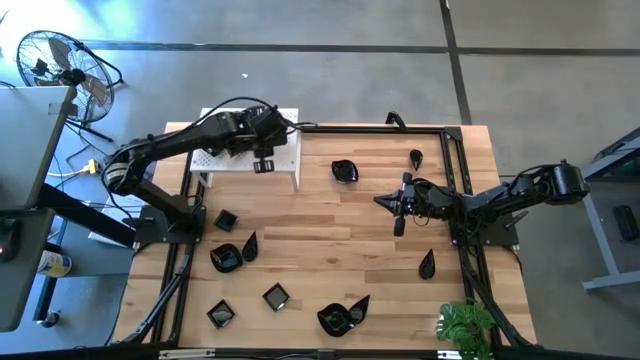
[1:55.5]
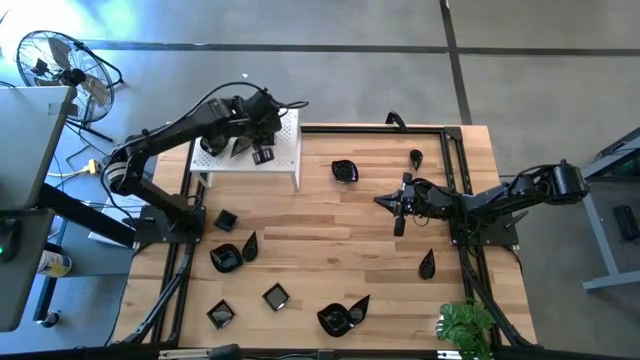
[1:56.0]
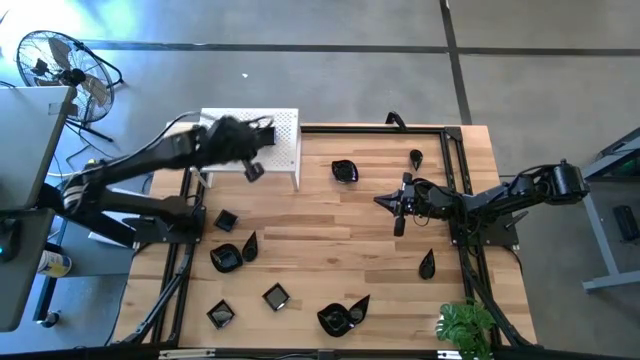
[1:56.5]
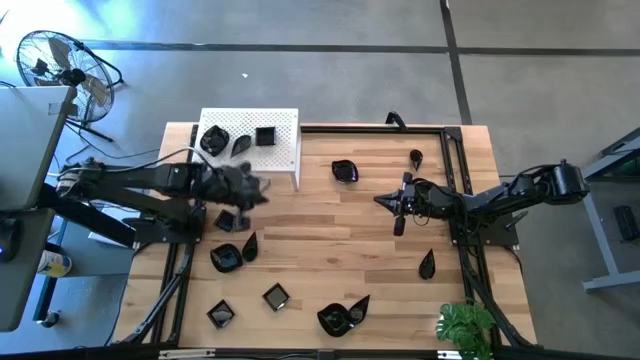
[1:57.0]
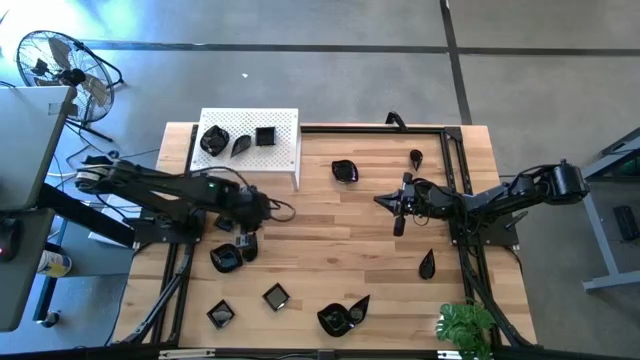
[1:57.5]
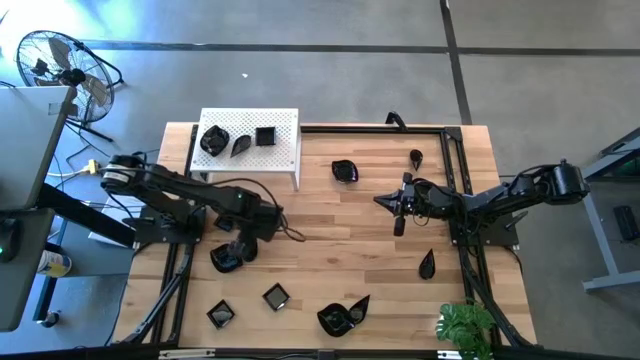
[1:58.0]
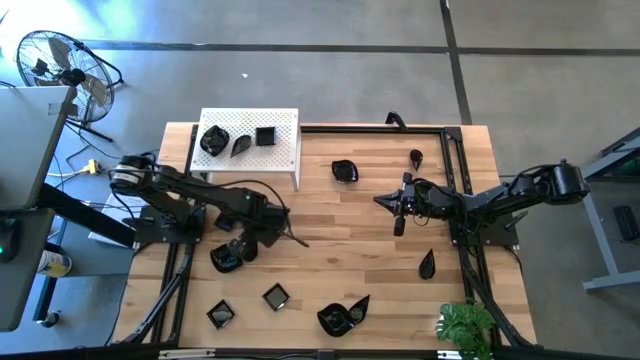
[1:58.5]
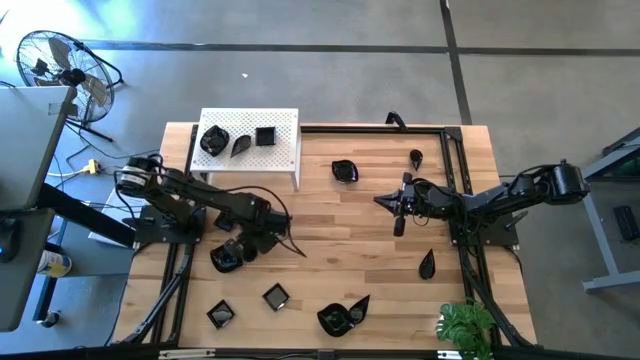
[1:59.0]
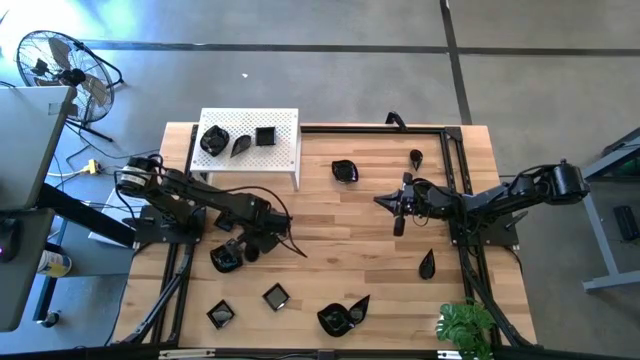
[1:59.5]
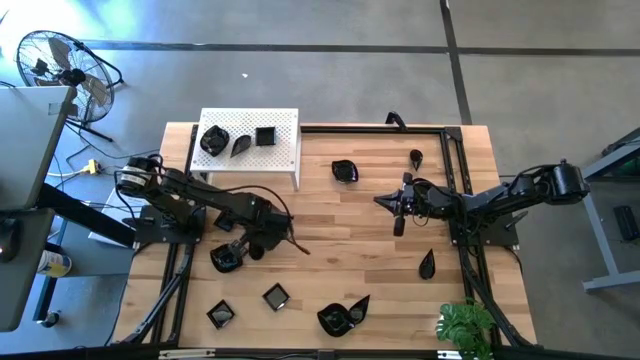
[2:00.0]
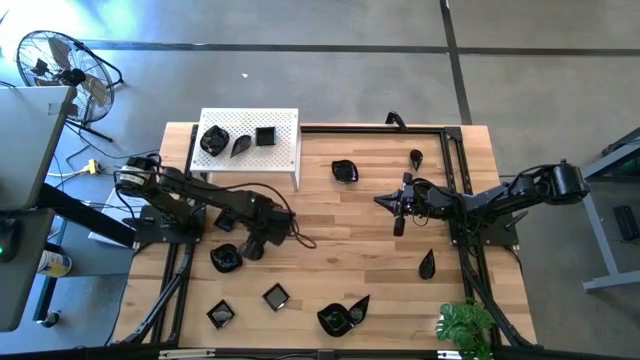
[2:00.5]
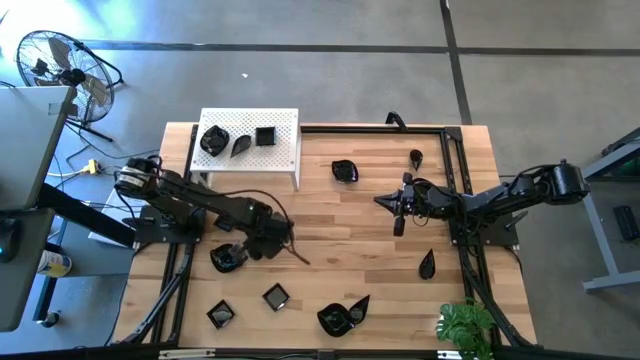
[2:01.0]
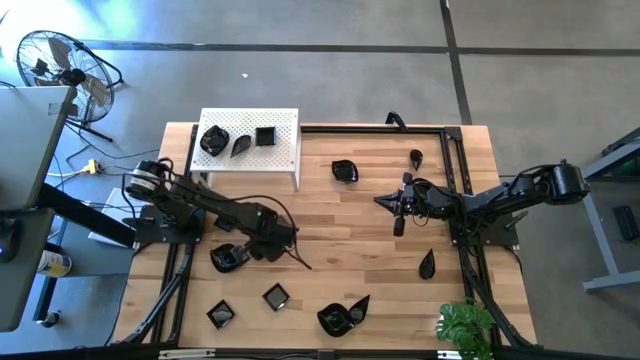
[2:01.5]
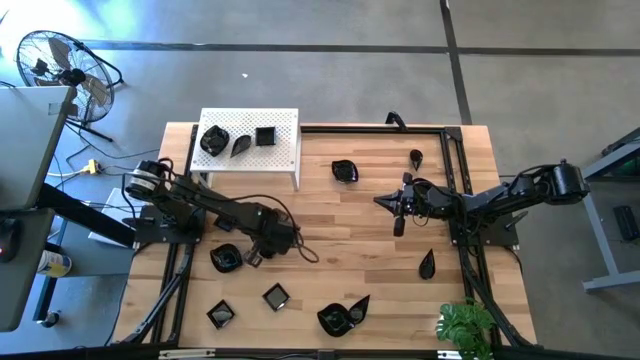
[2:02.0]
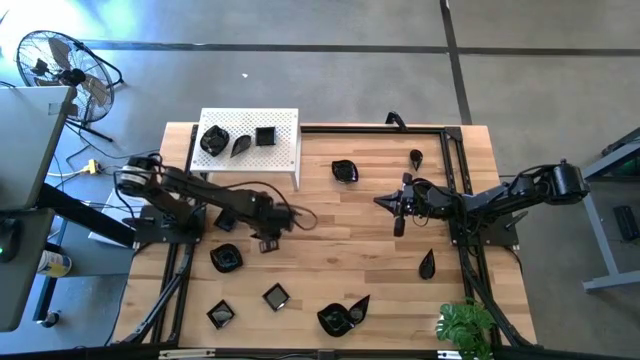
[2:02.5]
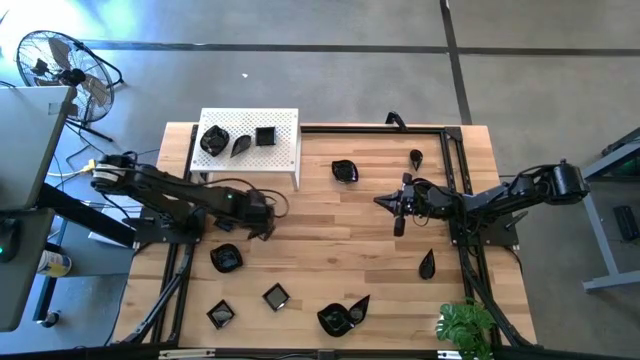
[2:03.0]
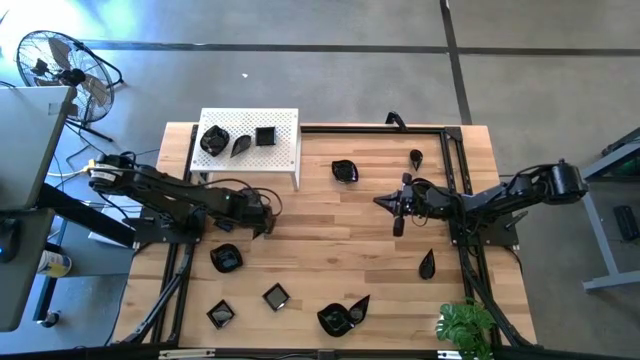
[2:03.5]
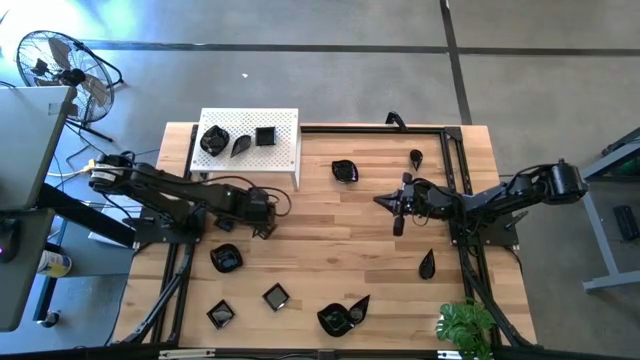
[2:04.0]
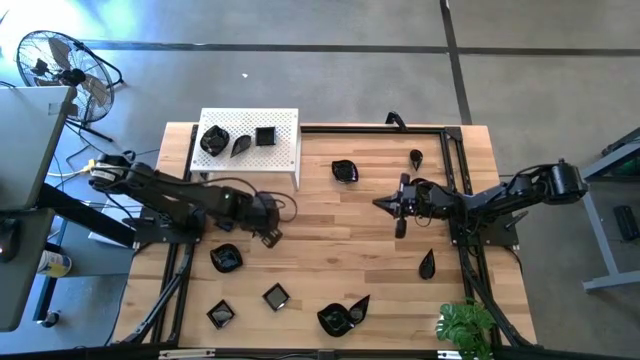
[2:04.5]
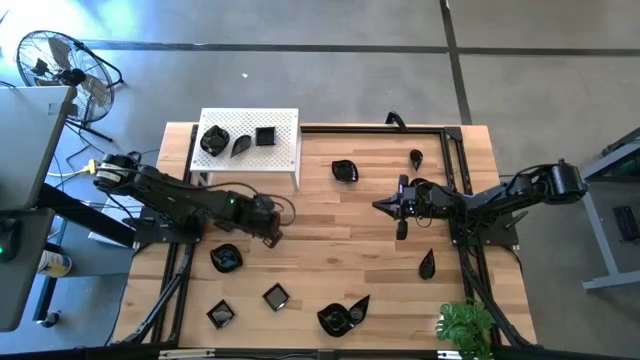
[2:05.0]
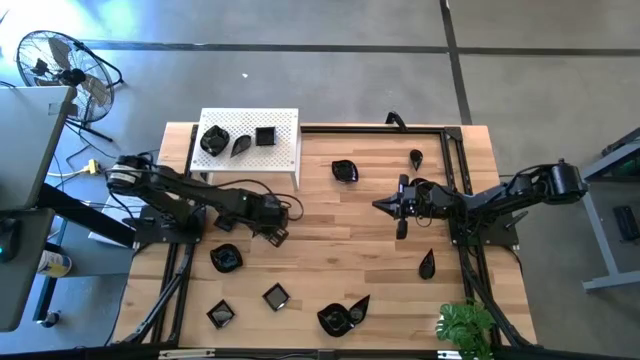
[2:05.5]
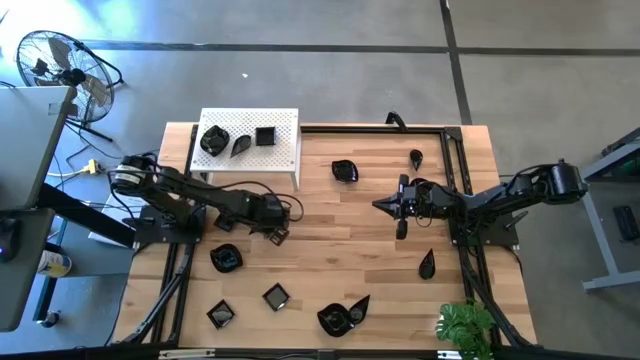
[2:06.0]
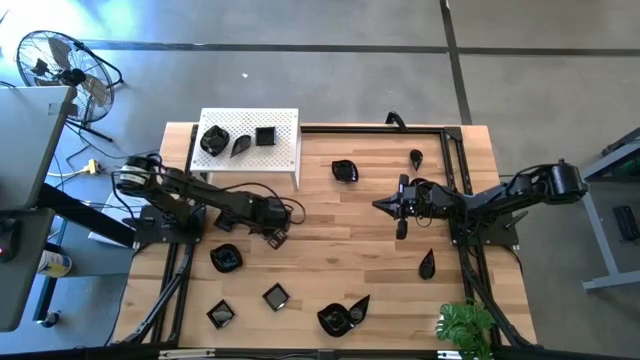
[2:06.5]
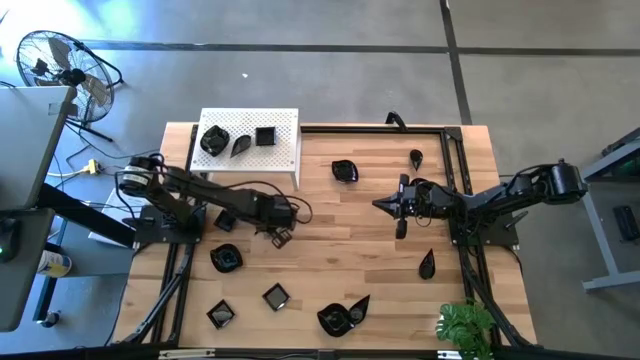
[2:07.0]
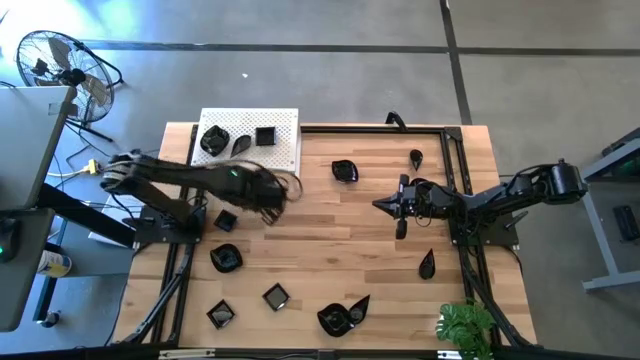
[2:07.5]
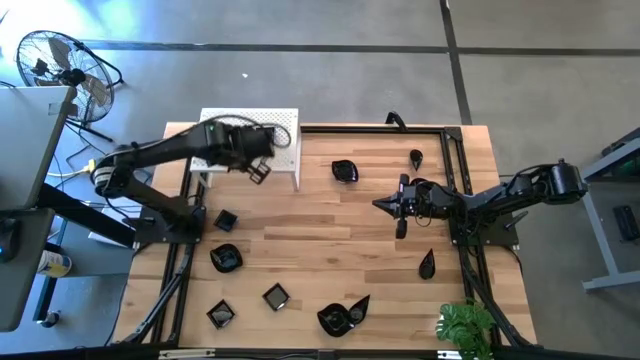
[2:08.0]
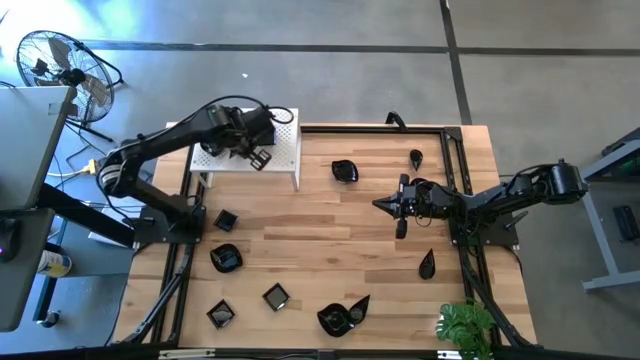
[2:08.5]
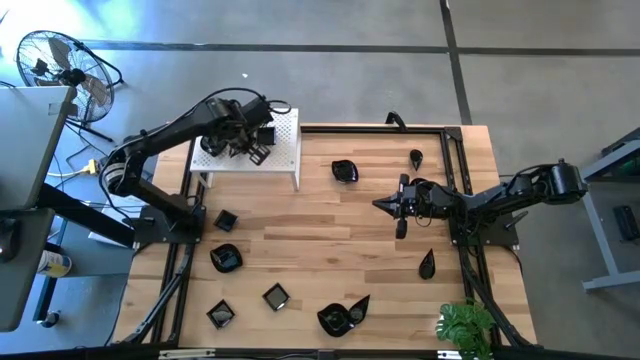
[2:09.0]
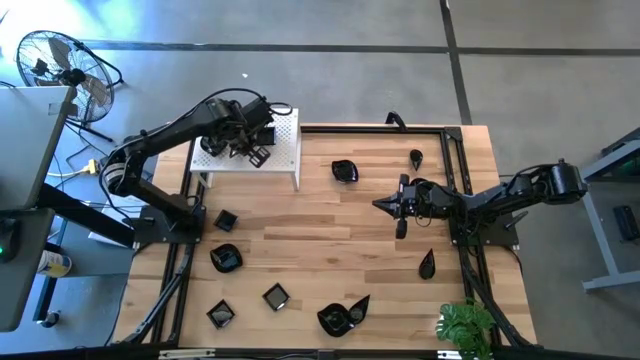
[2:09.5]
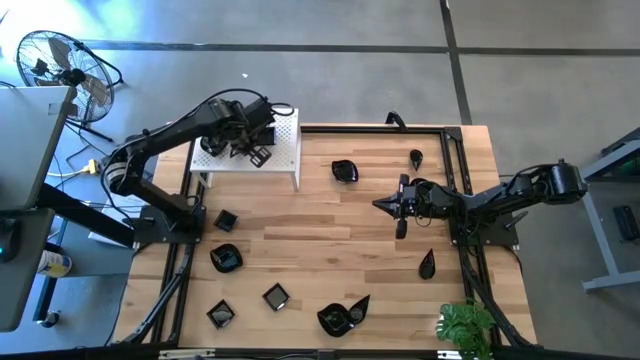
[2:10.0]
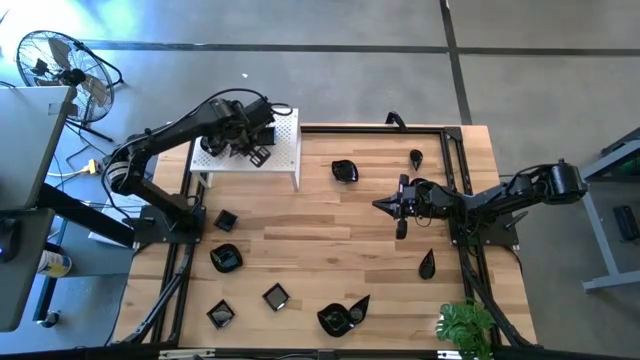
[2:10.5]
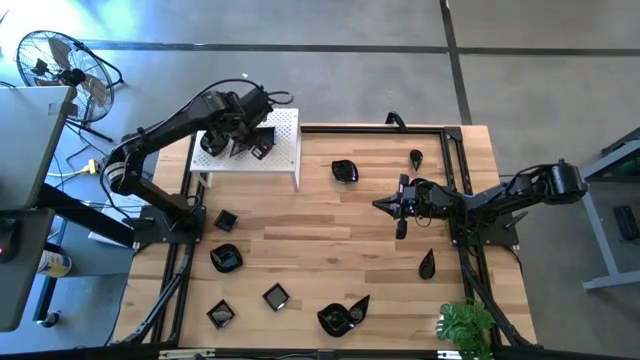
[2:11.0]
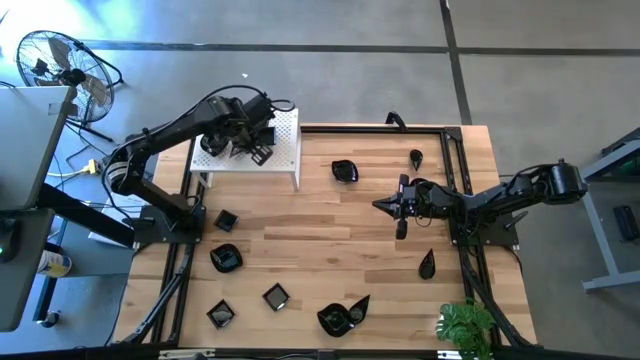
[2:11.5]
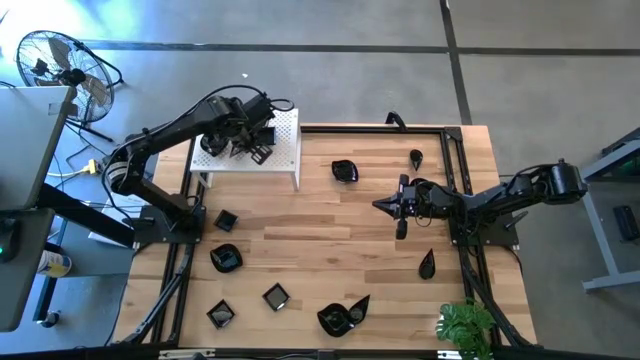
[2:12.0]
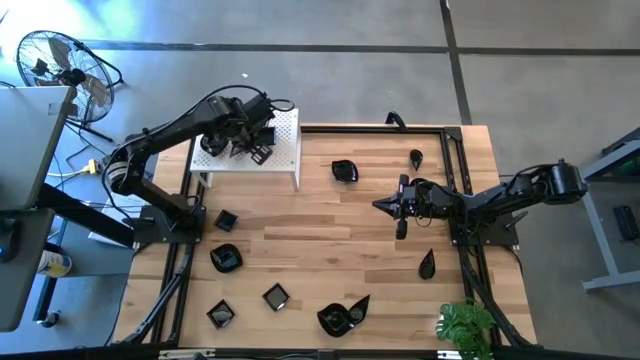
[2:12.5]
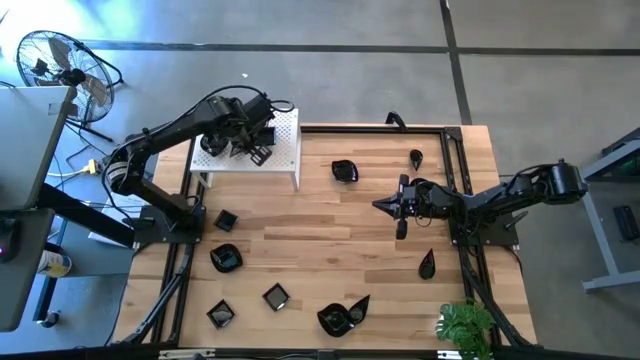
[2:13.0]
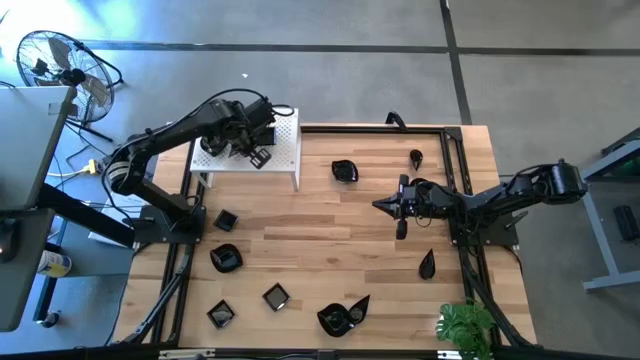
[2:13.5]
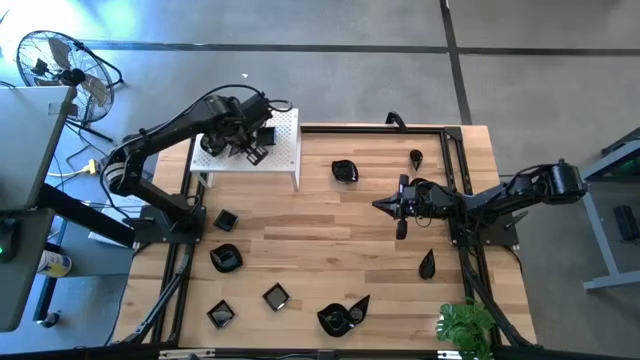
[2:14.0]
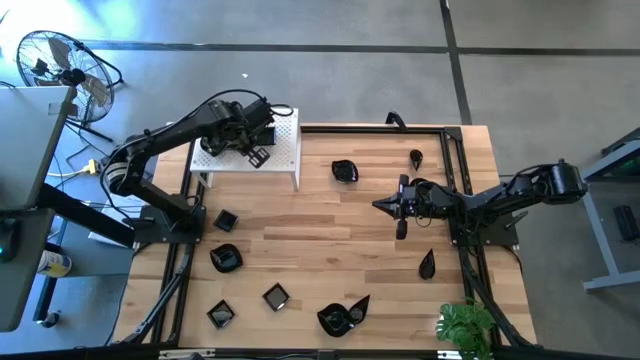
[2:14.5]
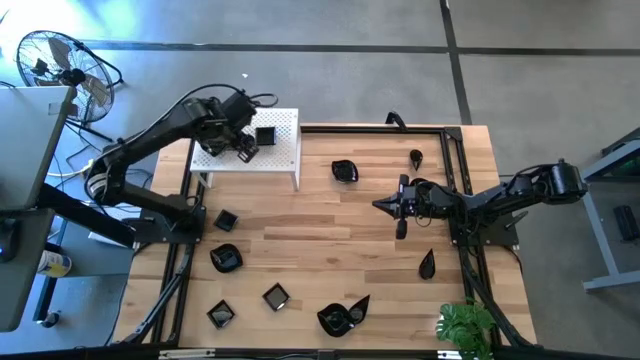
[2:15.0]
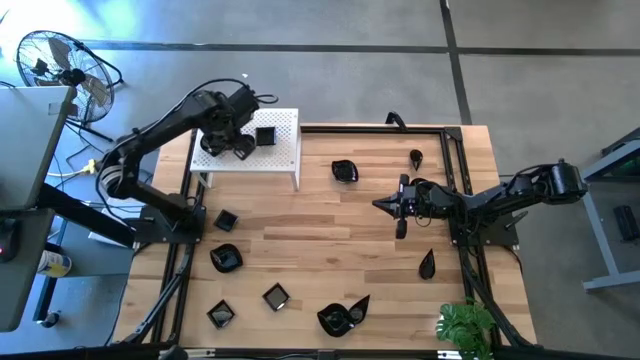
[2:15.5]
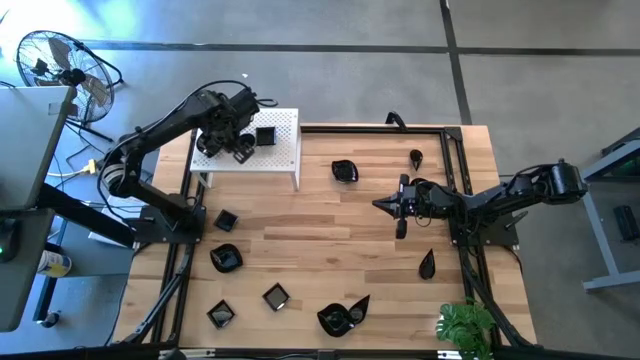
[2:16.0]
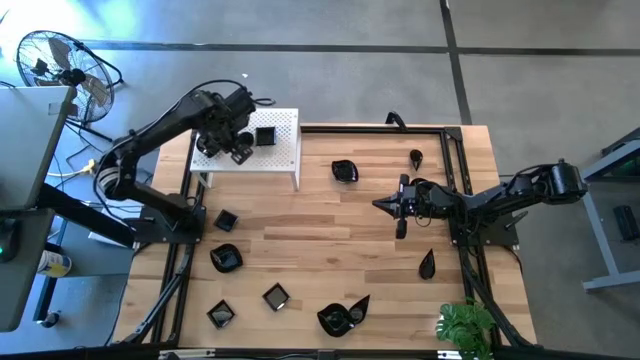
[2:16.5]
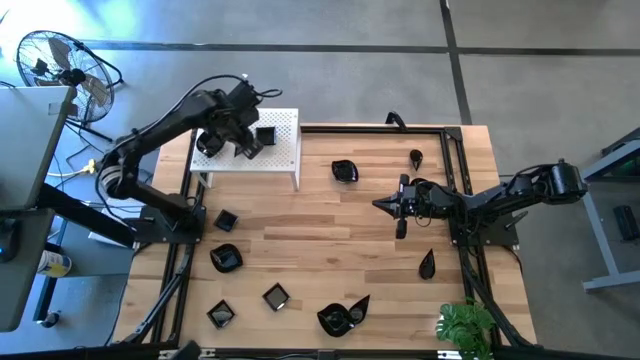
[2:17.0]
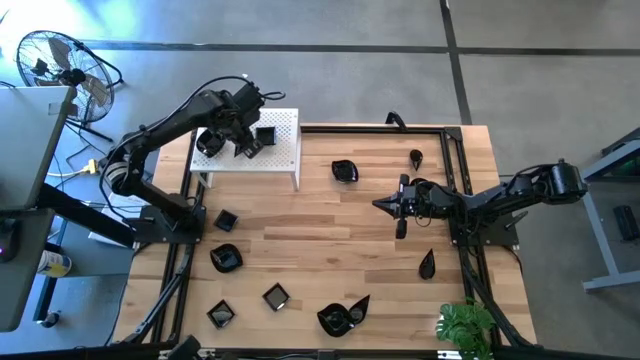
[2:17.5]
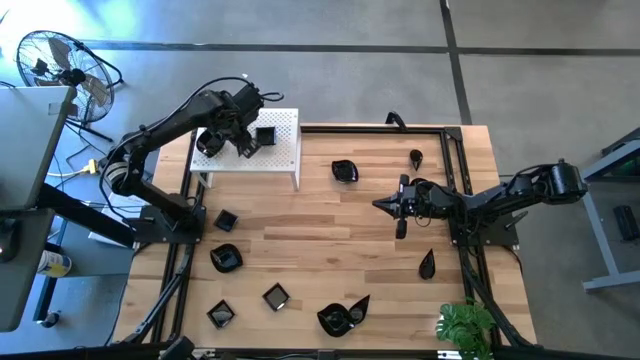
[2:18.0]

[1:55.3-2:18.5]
Task: Pick & Place Mini shaped plates
Stack the black drop shaped plate on top of the stacked black drop shaped plates on the shelf
